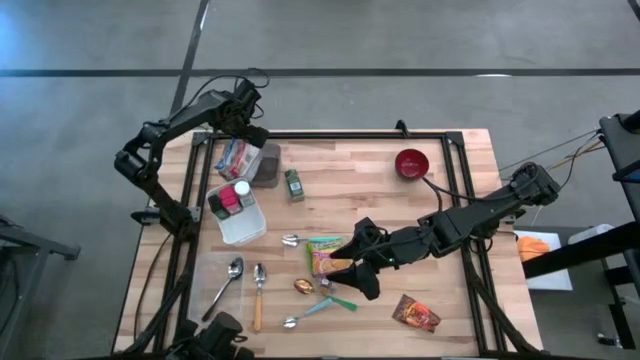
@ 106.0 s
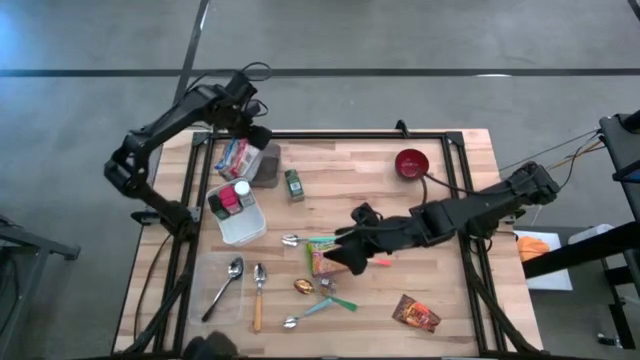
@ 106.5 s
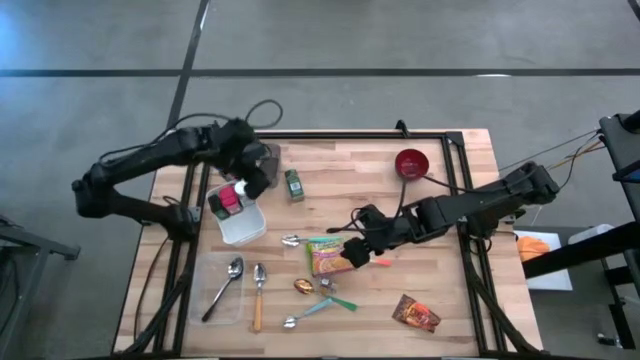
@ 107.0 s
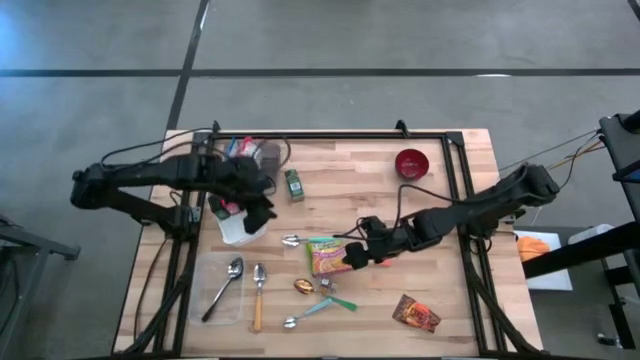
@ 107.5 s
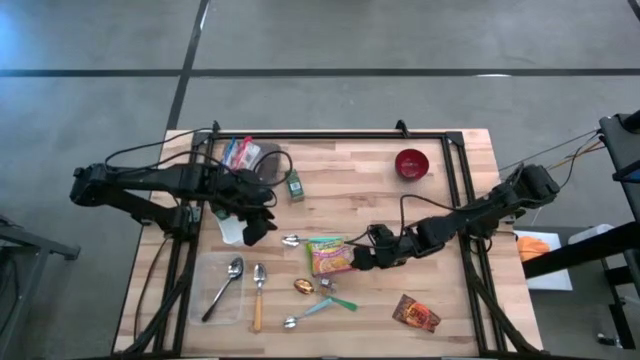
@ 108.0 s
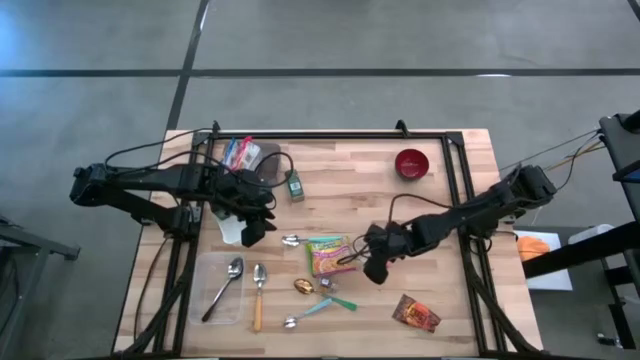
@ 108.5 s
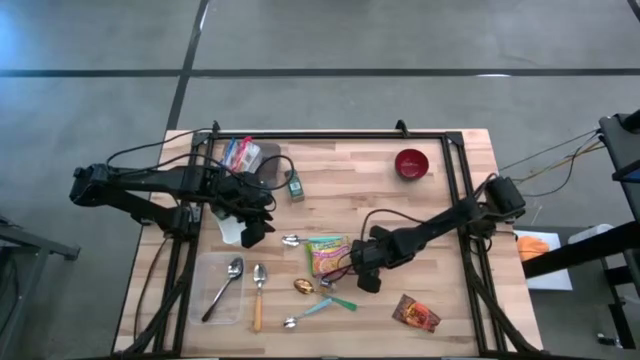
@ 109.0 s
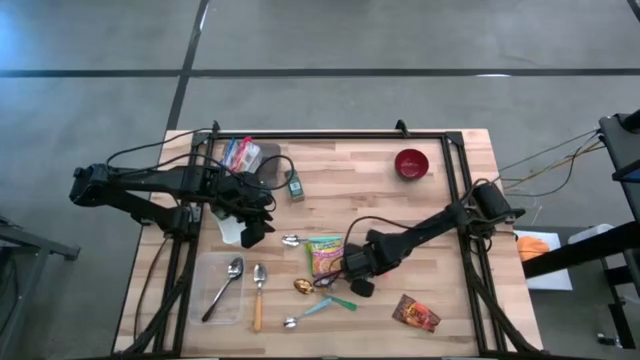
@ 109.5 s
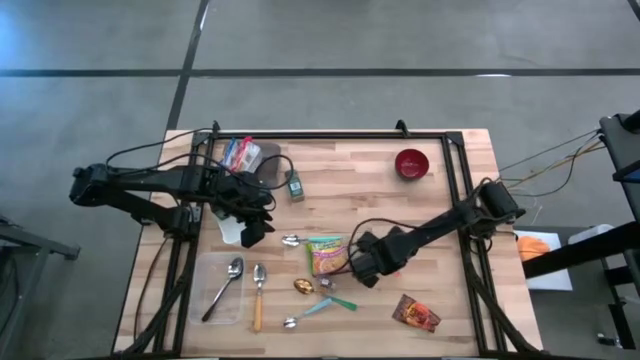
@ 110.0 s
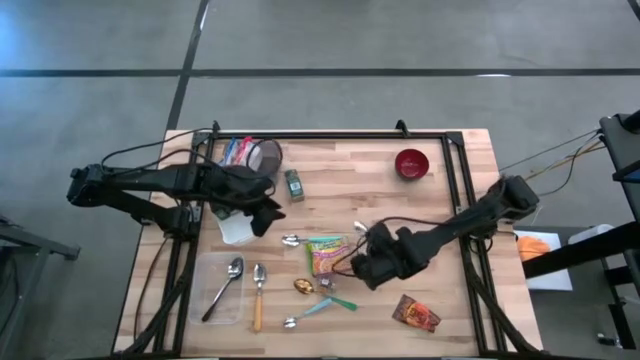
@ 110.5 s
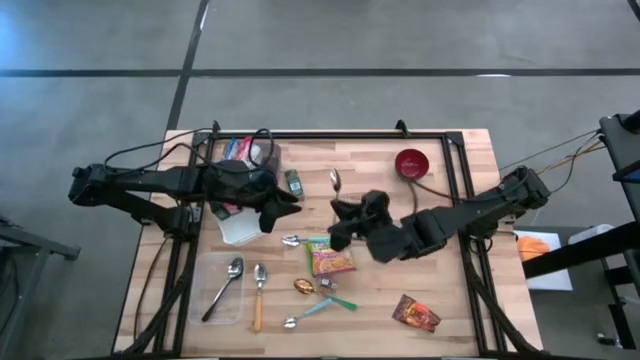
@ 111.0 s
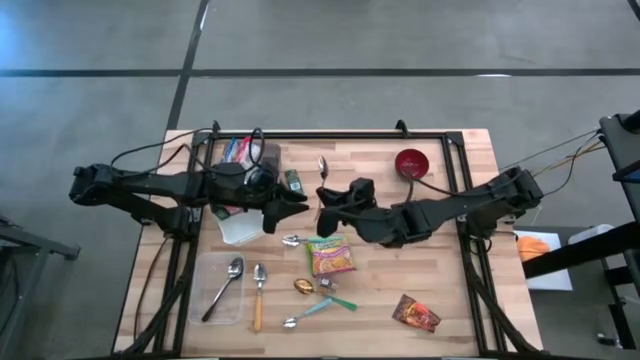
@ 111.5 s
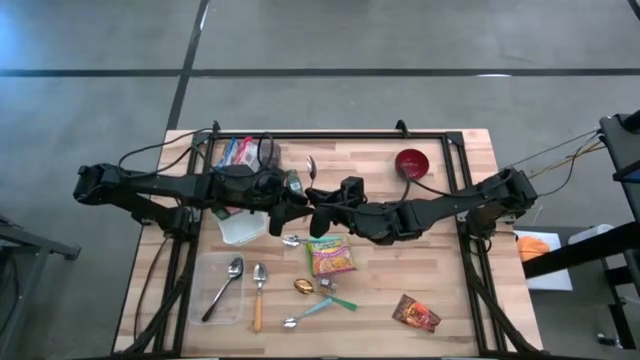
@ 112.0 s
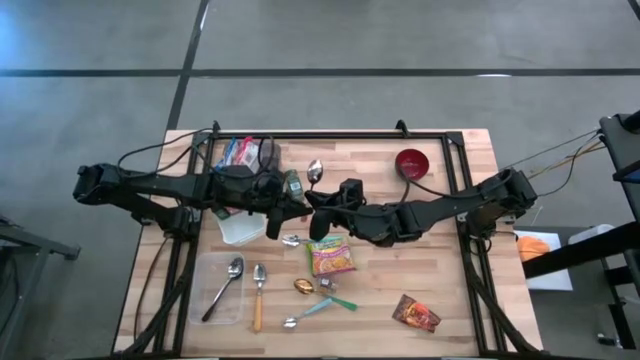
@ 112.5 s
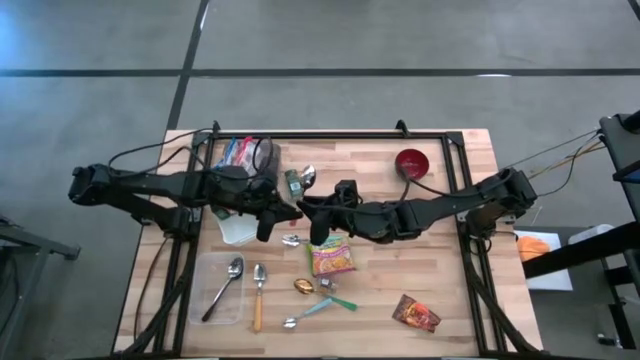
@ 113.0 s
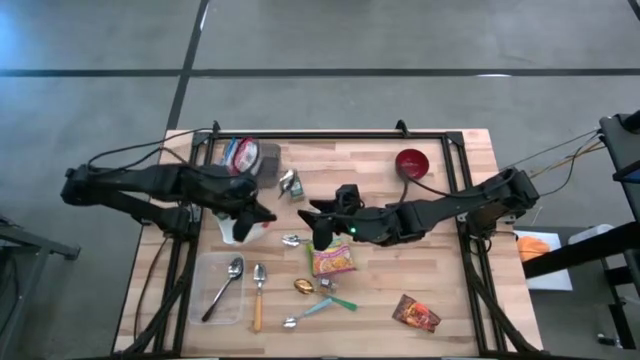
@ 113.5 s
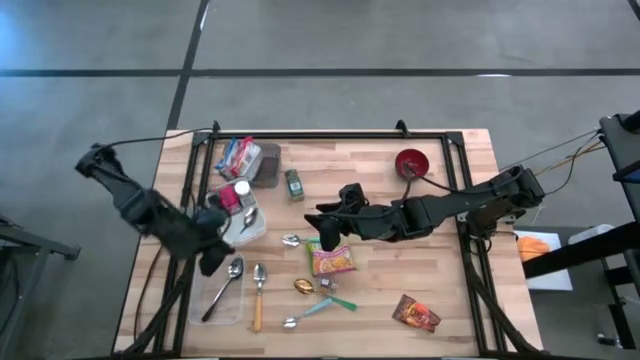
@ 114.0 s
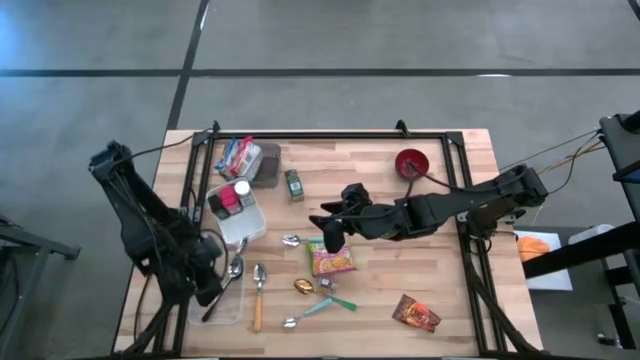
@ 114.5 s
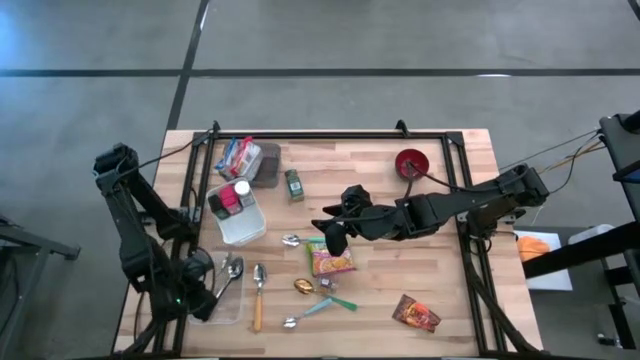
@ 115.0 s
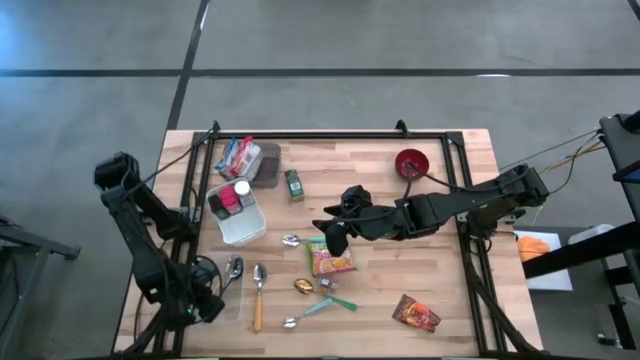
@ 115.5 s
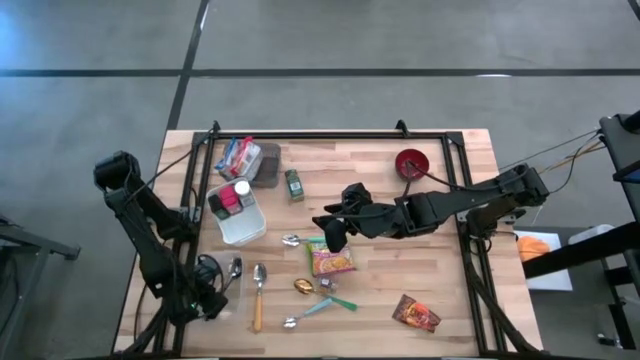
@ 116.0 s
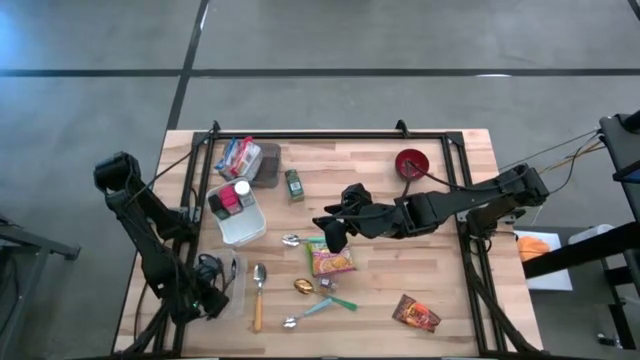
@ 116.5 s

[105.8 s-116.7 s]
Put the white and orange spoon into the transparent bin

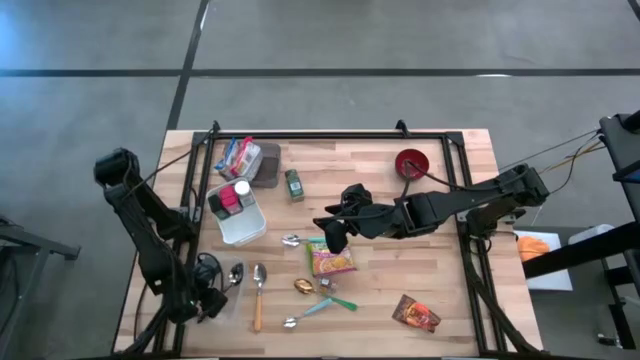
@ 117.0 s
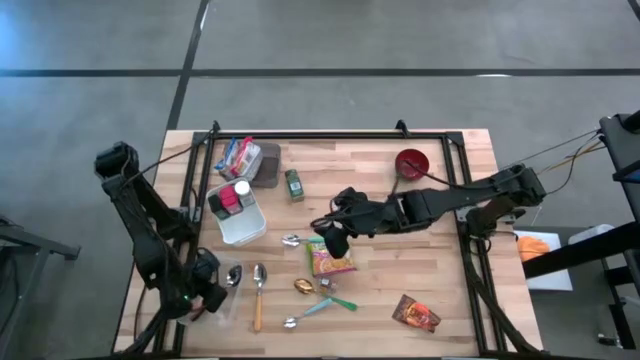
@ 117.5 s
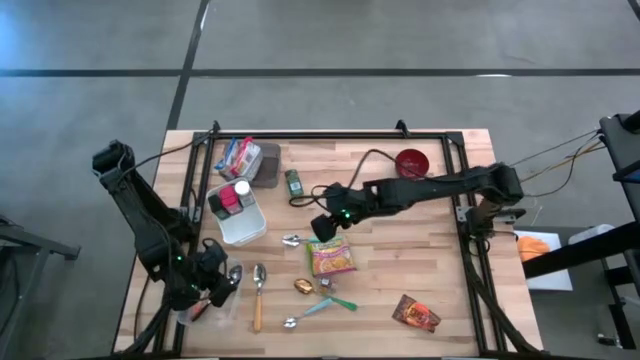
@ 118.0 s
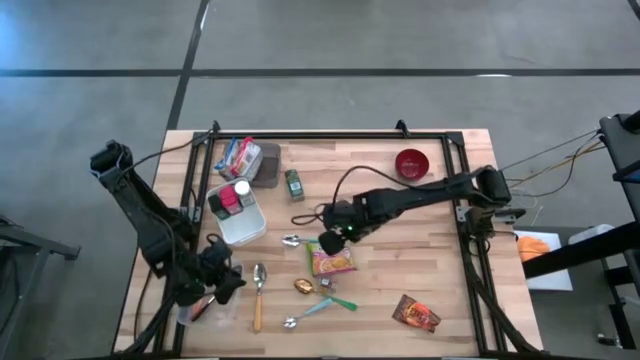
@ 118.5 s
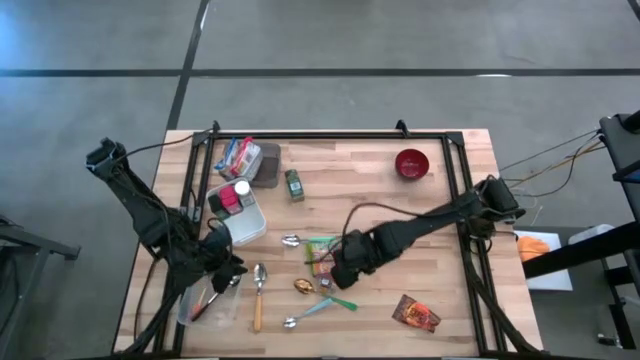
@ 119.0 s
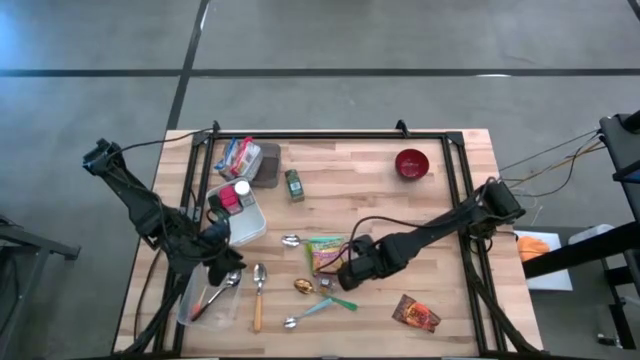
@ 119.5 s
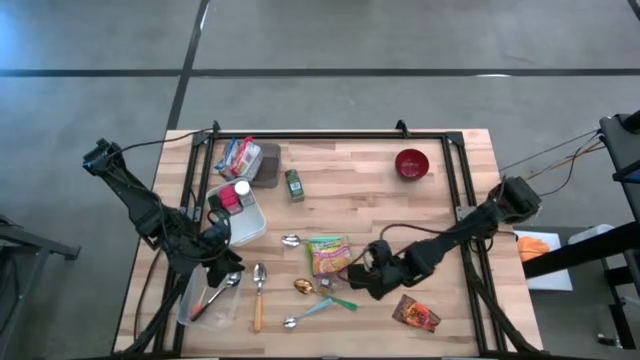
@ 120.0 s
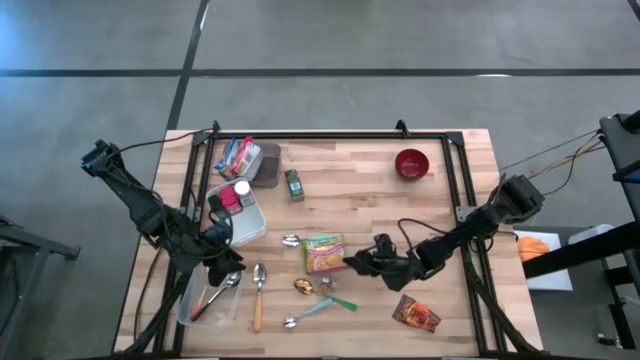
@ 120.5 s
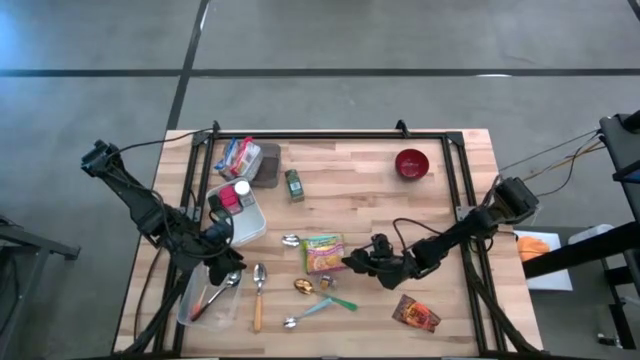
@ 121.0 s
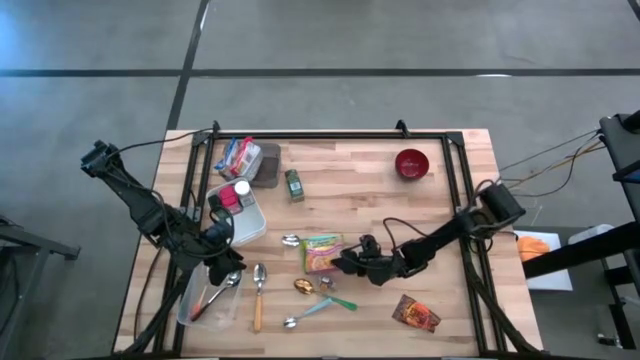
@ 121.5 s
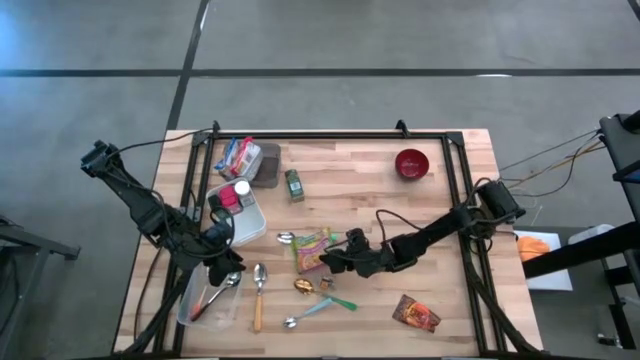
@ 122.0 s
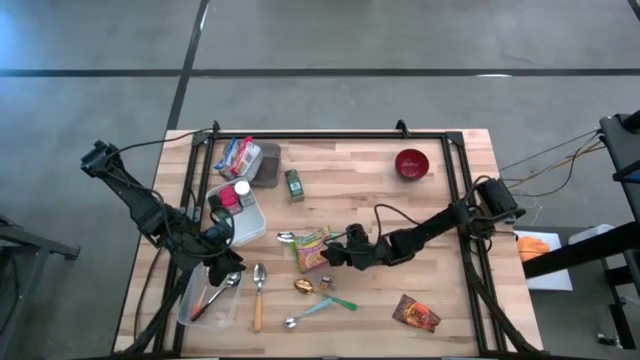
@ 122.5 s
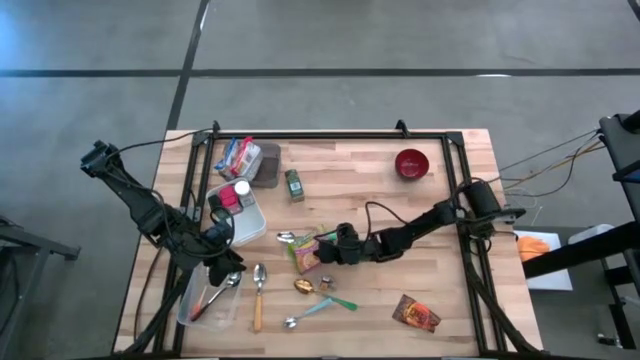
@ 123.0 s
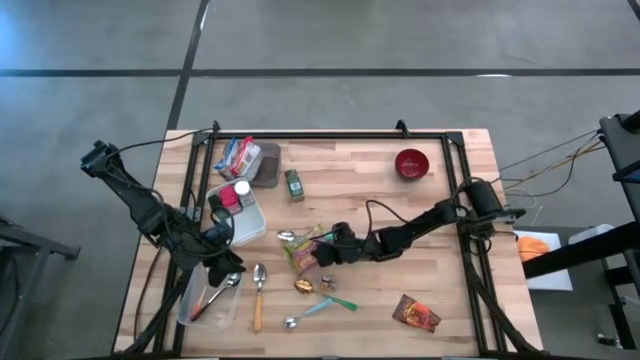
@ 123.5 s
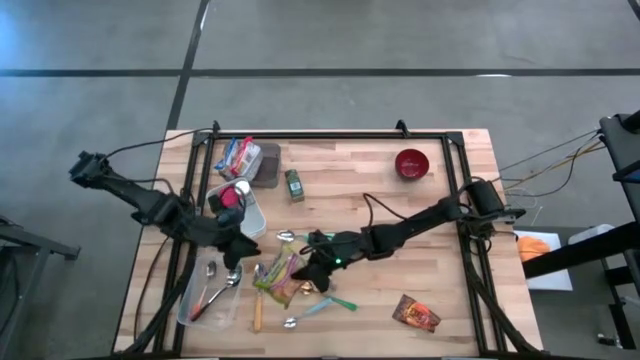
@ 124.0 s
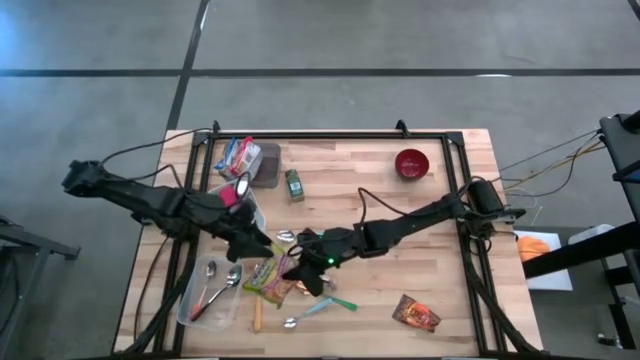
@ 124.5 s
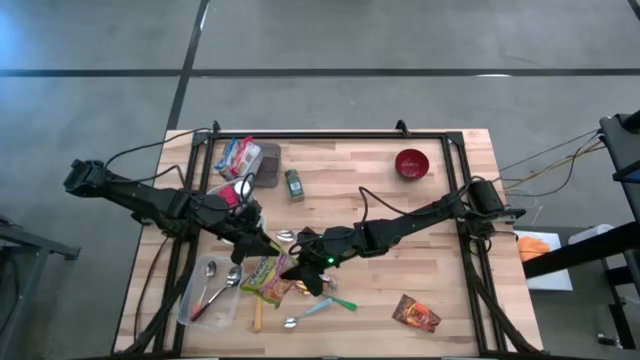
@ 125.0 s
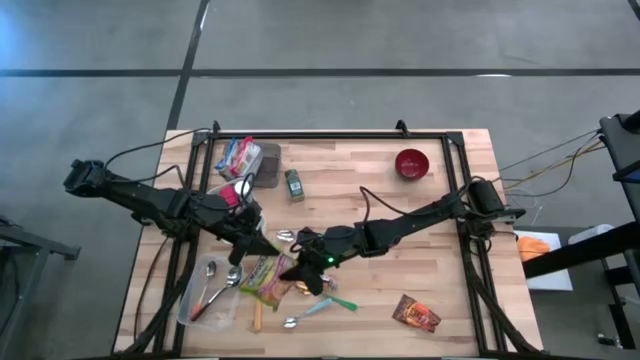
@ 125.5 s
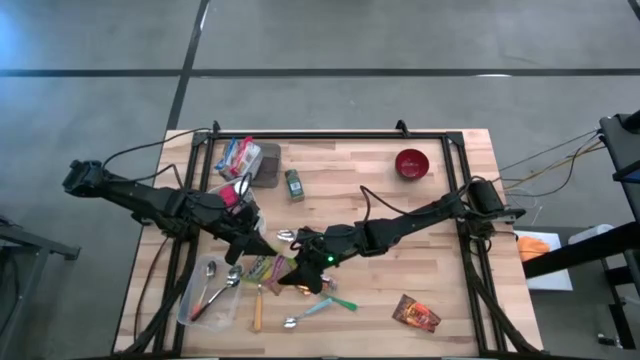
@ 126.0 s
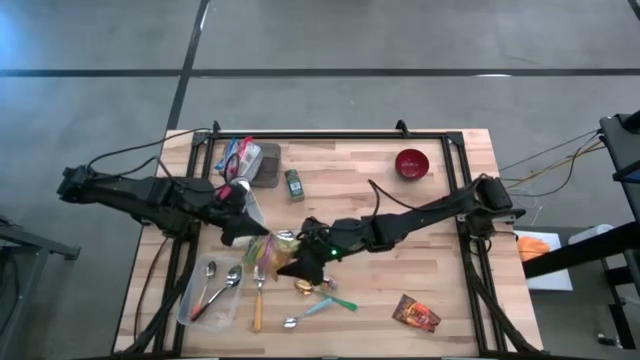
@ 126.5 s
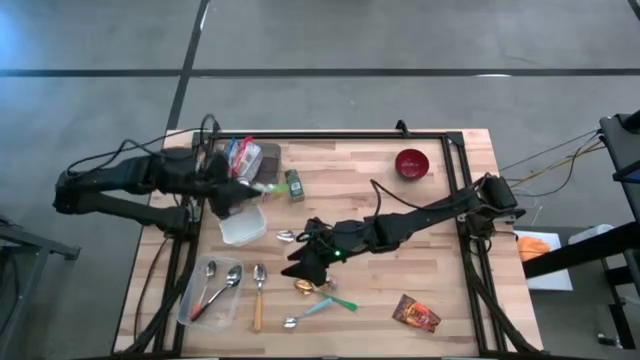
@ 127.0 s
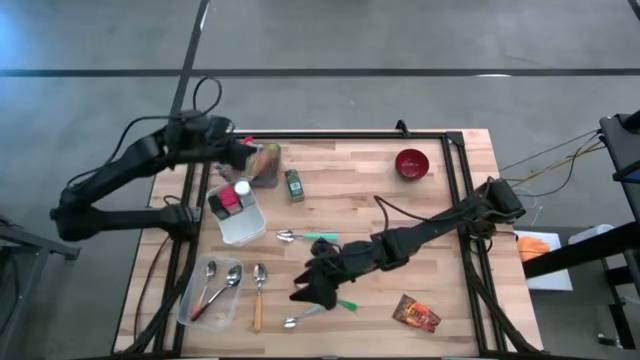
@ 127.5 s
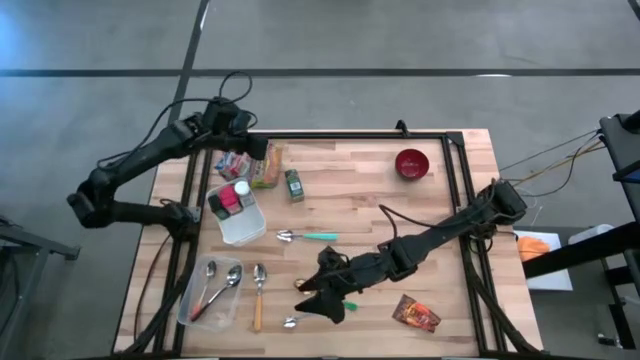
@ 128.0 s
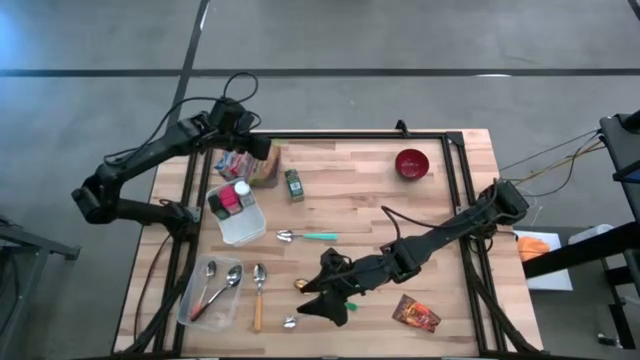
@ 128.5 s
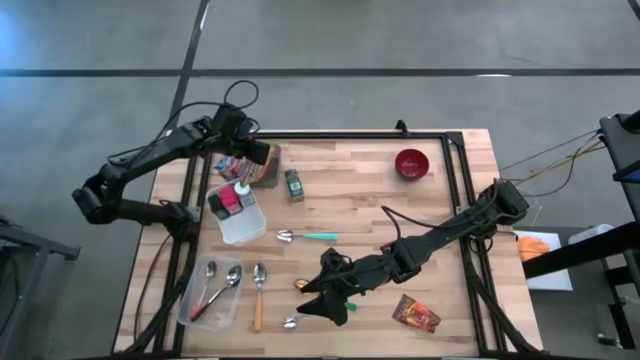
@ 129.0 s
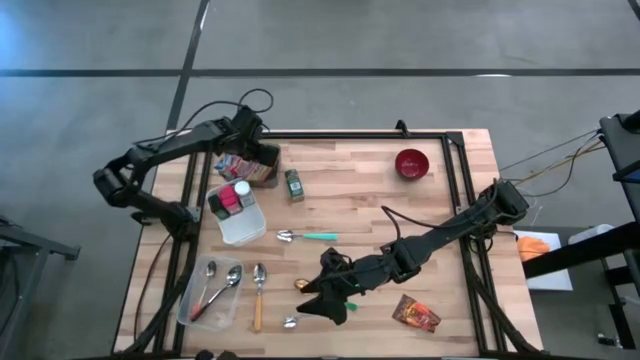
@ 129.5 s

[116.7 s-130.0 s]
Put the green noodle pack into the black bin
